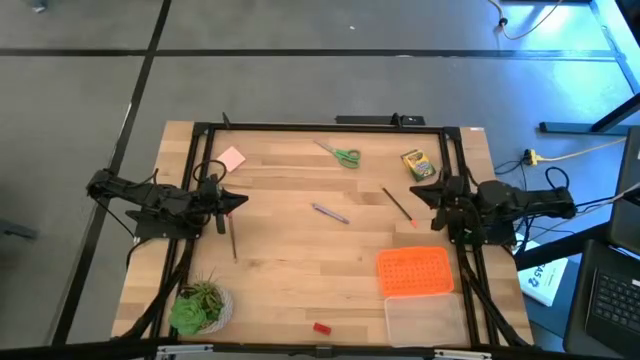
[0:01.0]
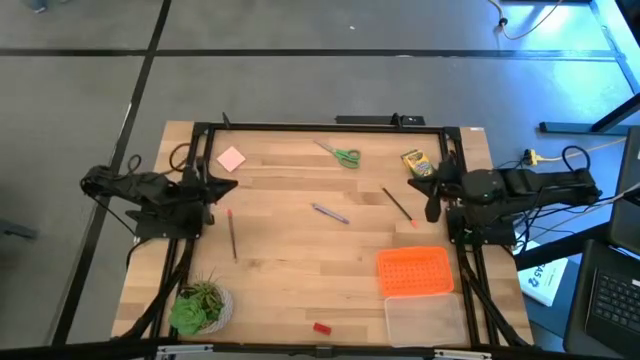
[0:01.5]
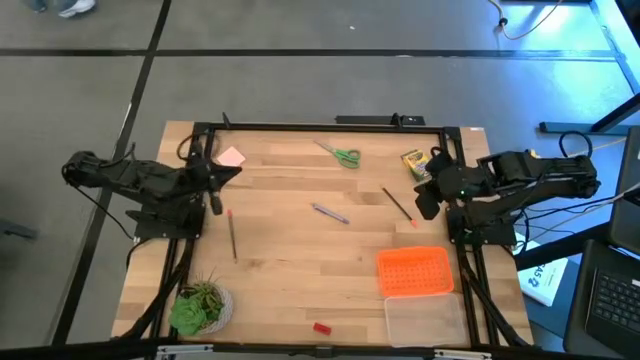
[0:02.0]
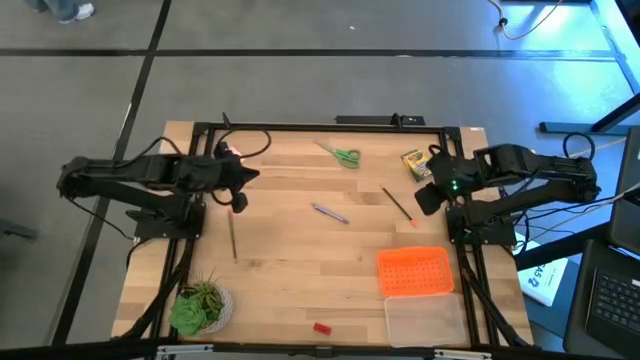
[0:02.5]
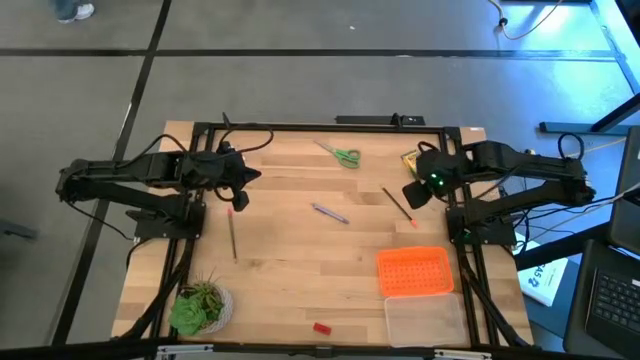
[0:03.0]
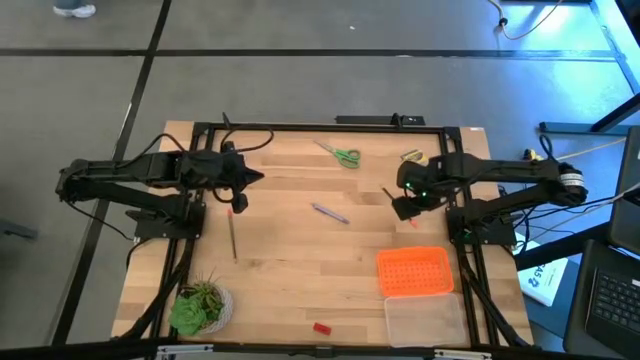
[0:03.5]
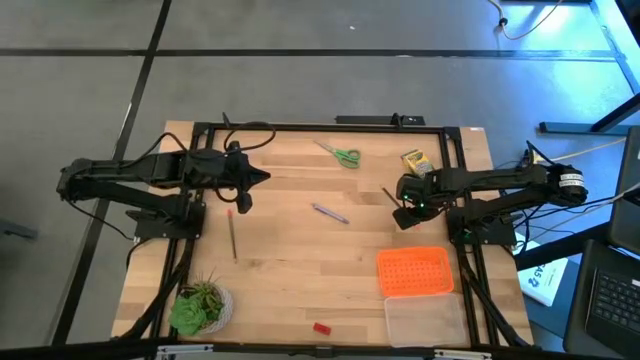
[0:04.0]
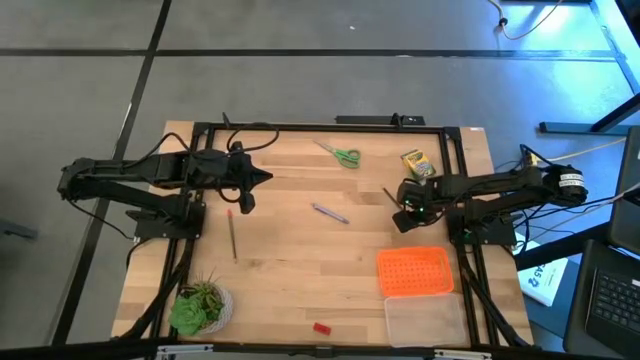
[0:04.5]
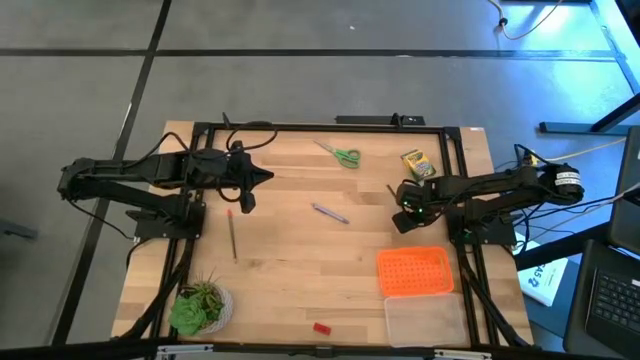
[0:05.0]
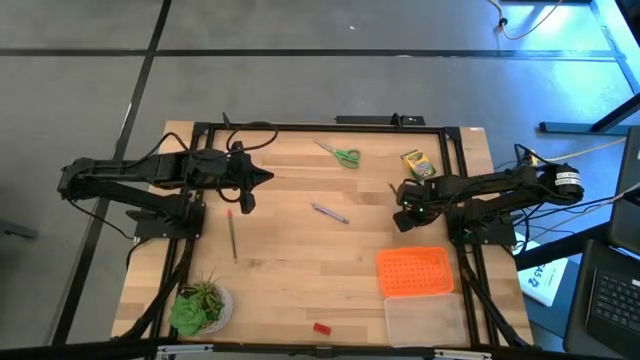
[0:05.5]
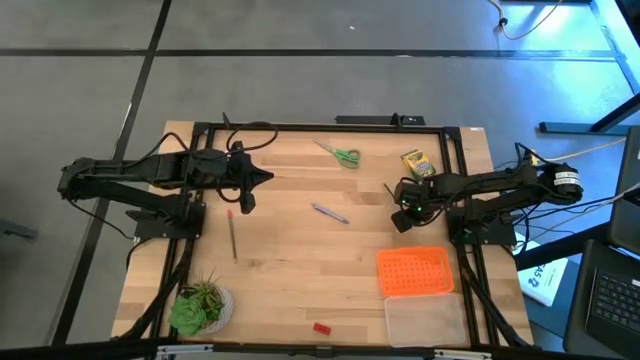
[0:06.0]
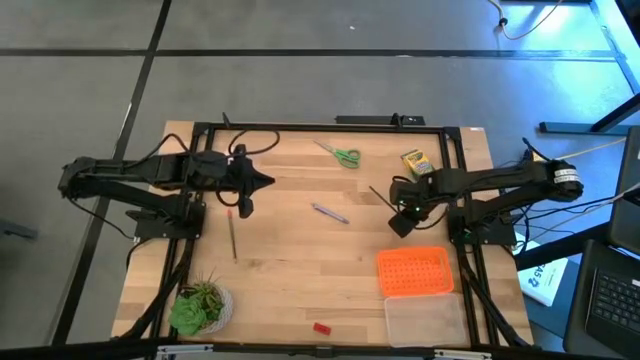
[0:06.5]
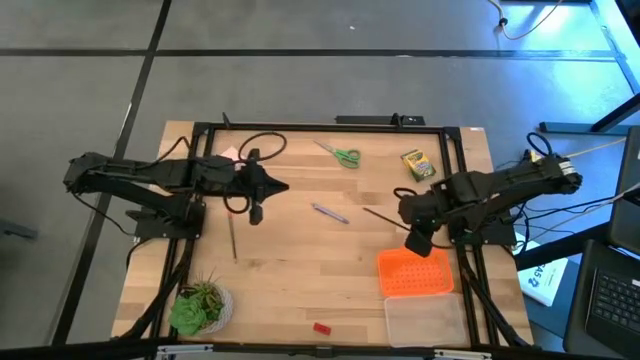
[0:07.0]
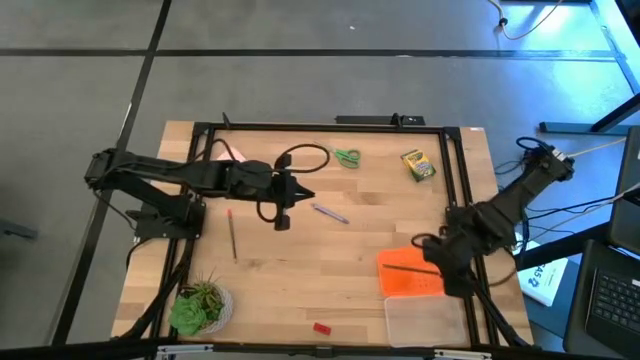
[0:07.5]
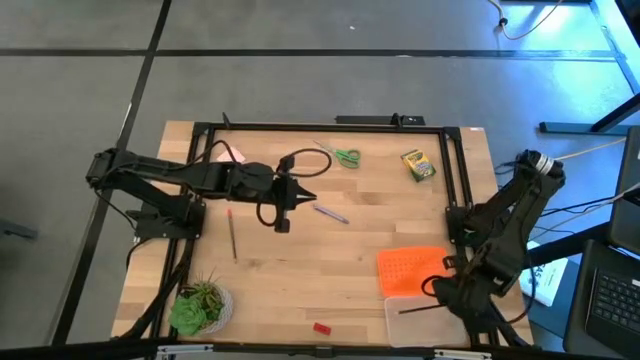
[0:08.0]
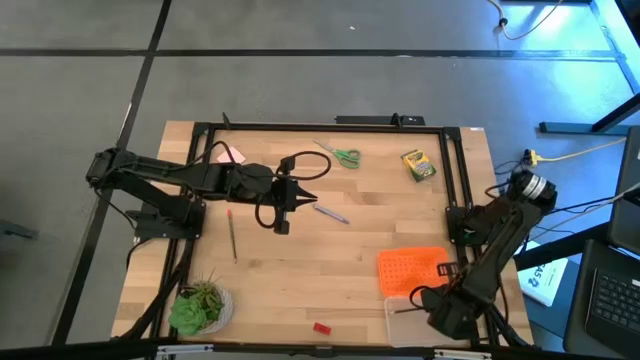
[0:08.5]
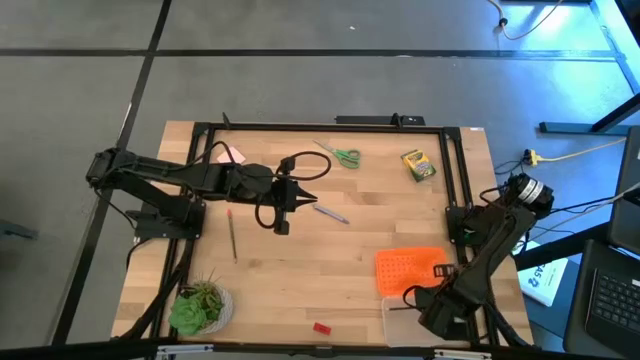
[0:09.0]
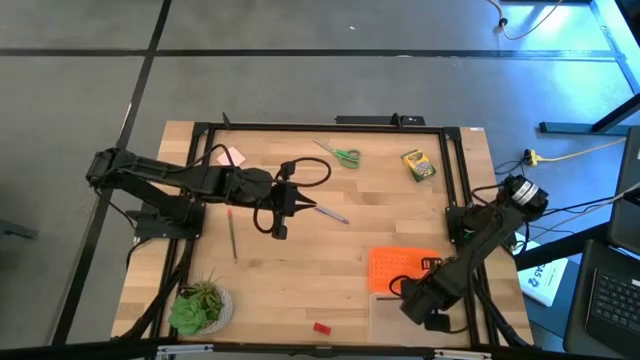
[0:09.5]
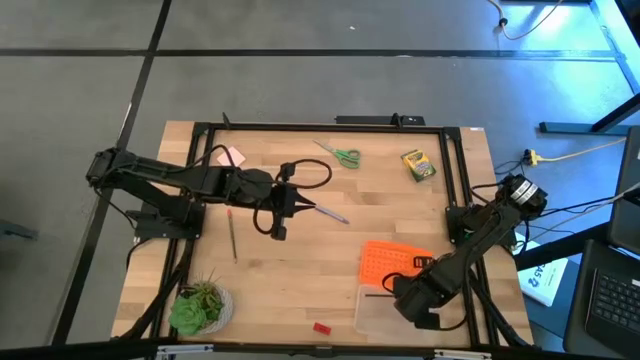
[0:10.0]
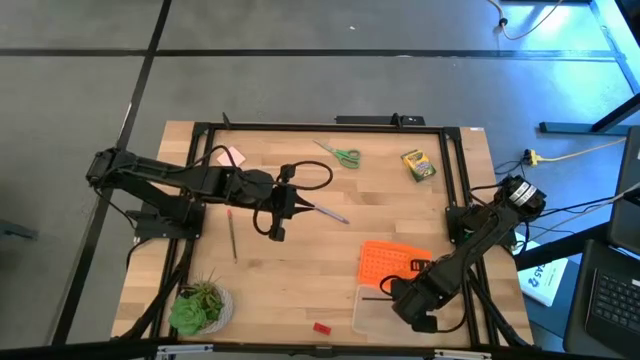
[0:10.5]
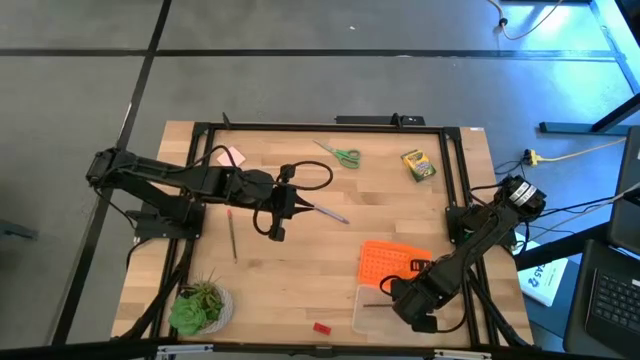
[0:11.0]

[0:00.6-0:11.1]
Task: Pack school essentials
Put the black pencil into the orange supply box

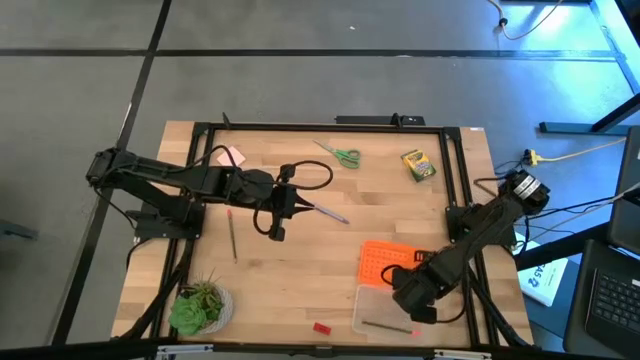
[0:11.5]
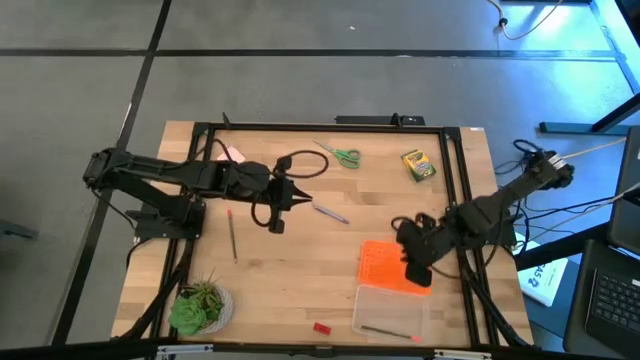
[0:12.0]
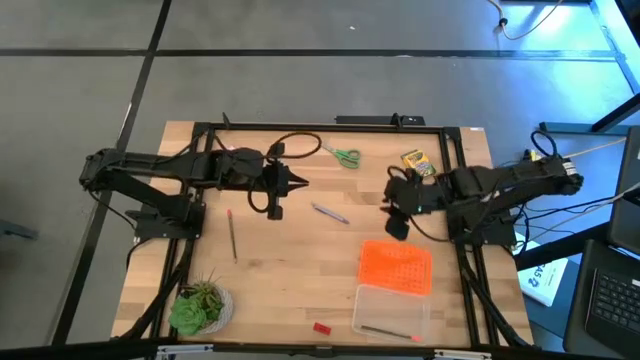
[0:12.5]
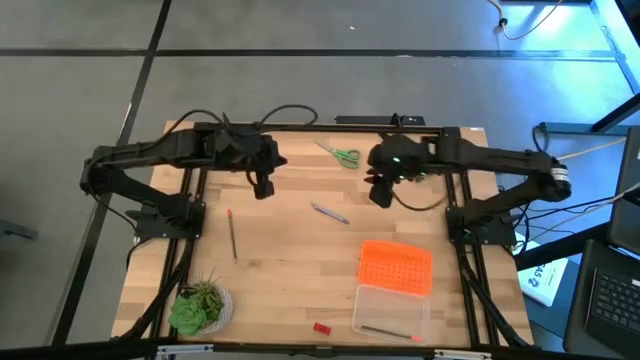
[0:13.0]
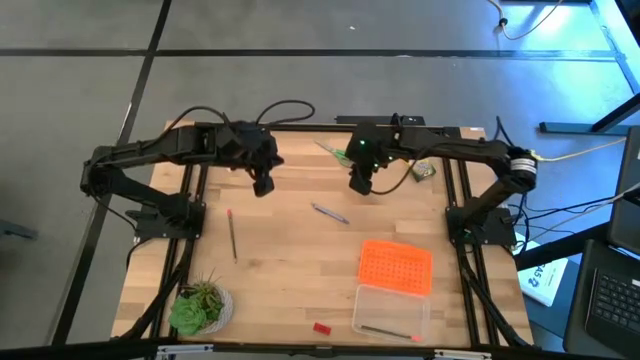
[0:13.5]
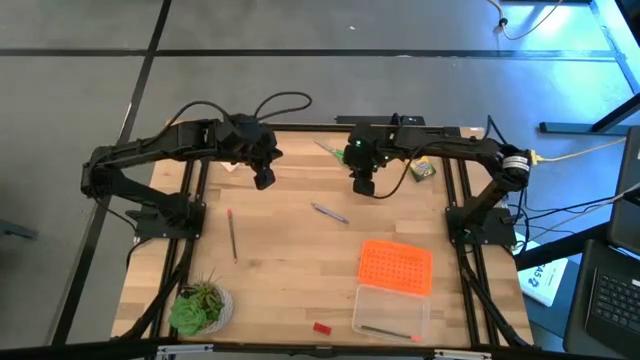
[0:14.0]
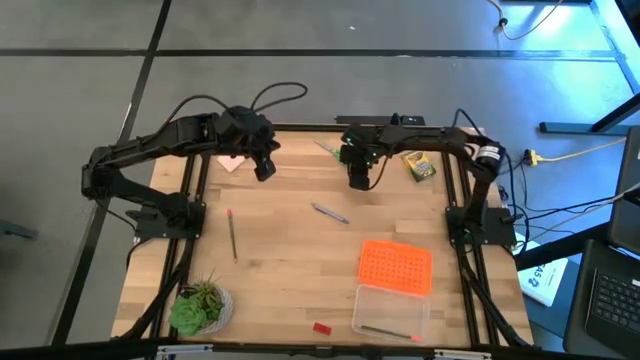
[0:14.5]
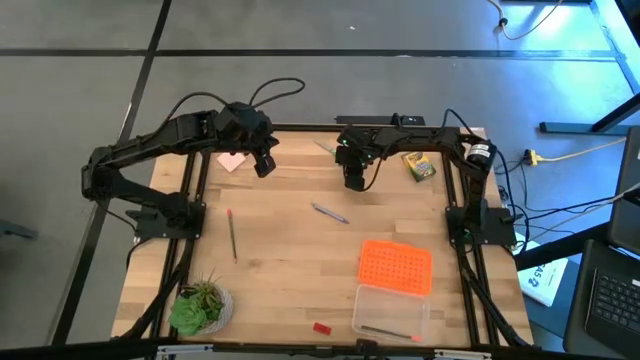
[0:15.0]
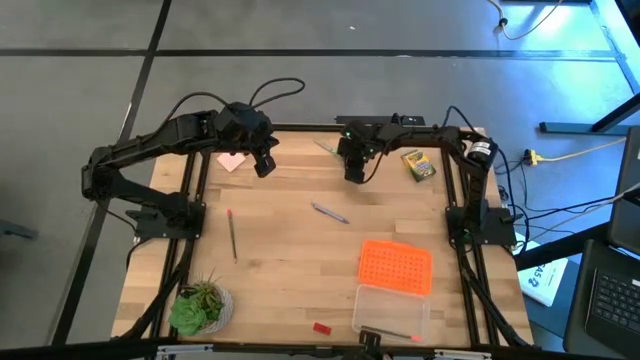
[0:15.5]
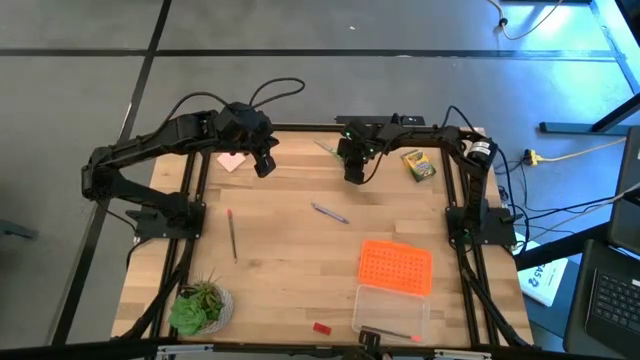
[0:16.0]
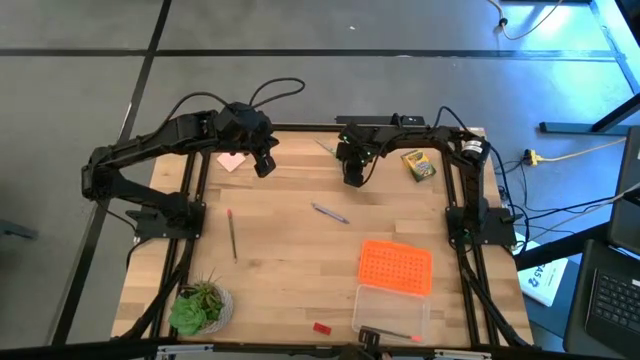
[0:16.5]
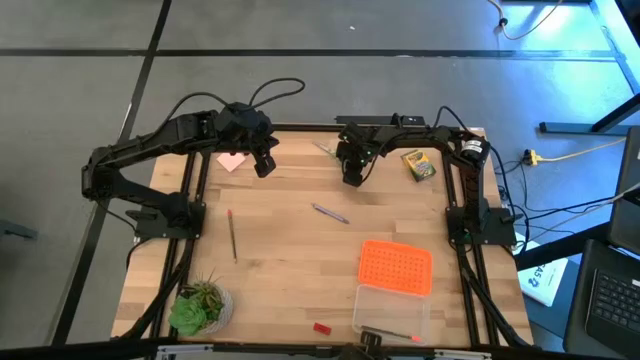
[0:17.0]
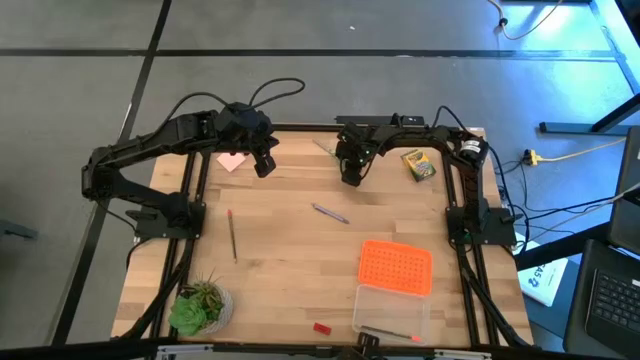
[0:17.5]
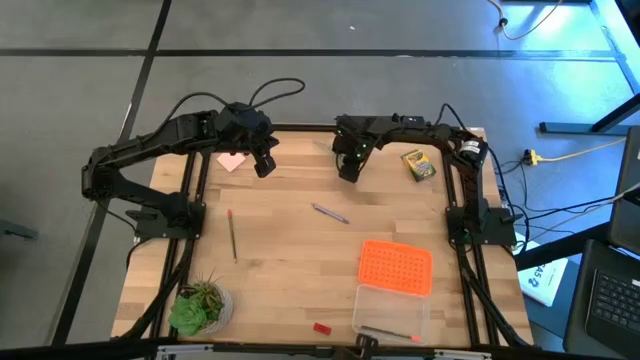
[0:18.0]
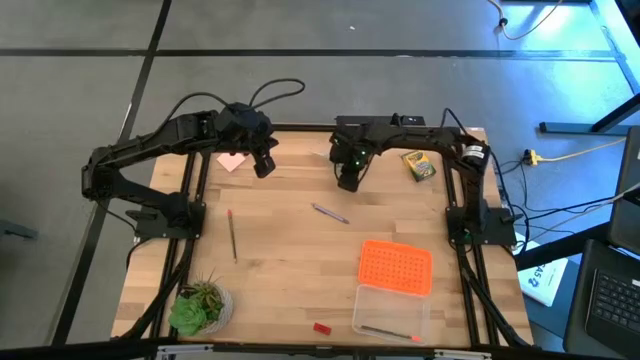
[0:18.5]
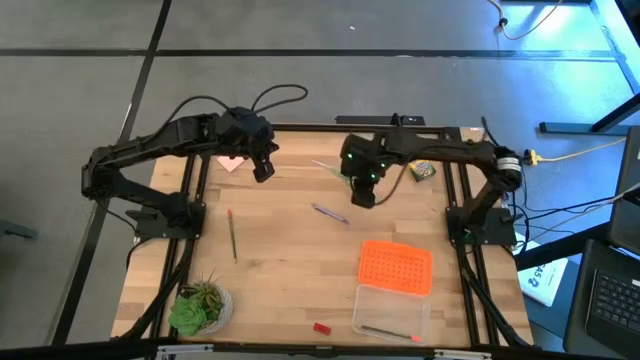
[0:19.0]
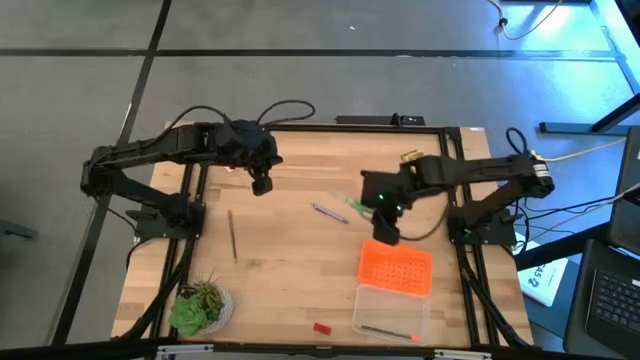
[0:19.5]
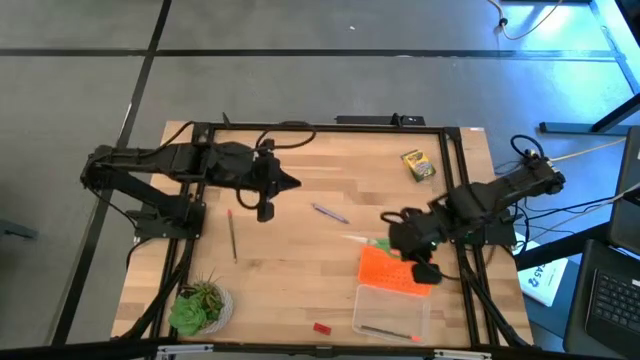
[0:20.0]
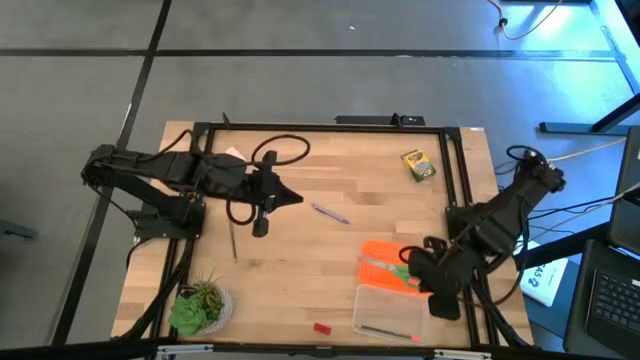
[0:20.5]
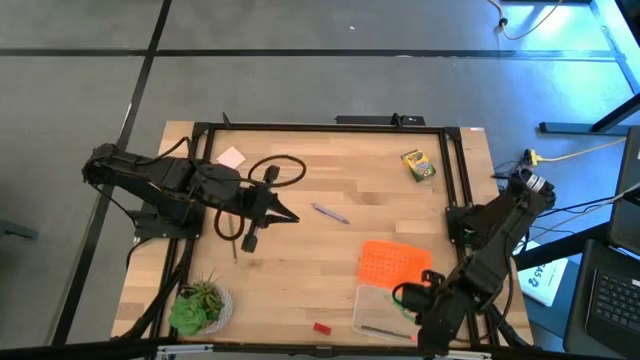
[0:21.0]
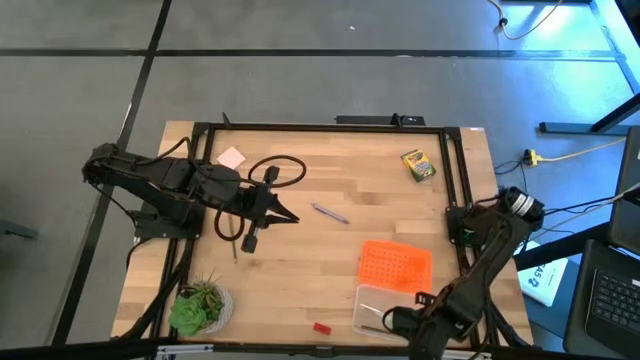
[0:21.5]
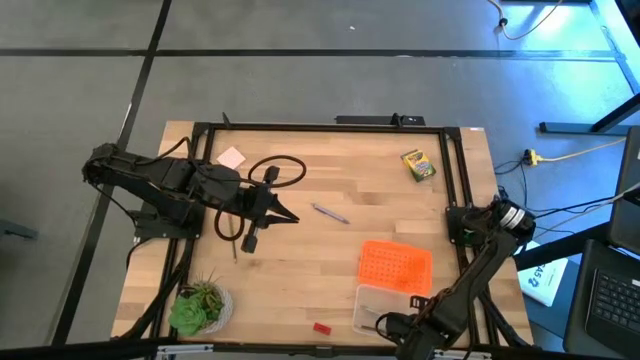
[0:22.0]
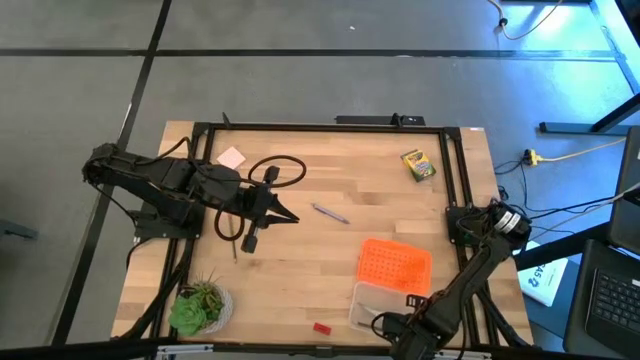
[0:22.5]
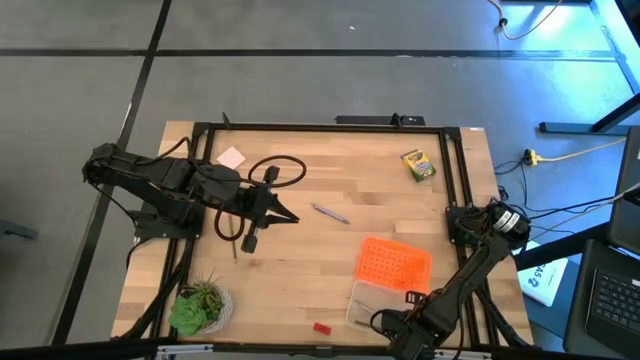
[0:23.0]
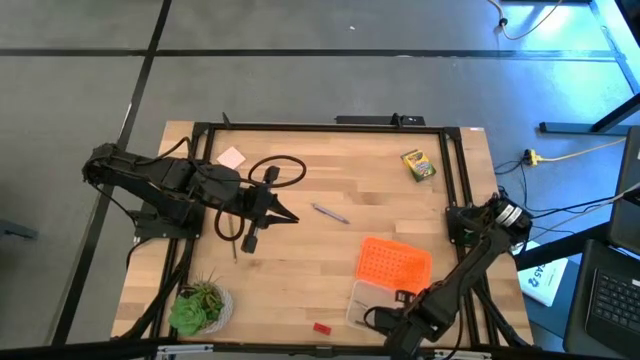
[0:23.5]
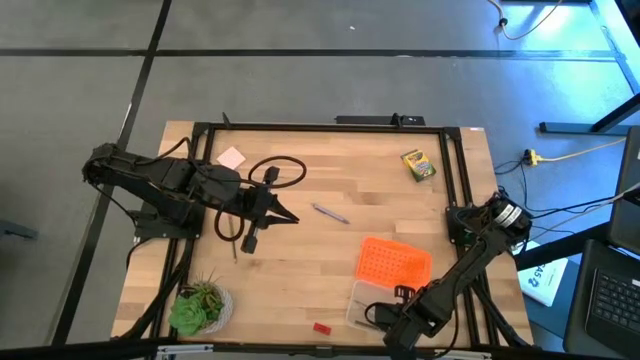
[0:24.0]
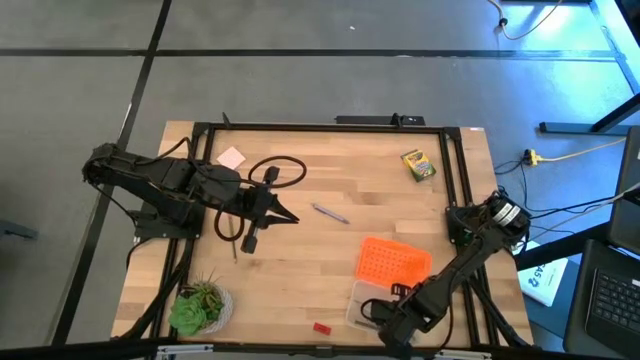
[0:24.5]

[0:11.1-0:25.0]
Put the green scissors into the orange supply box
